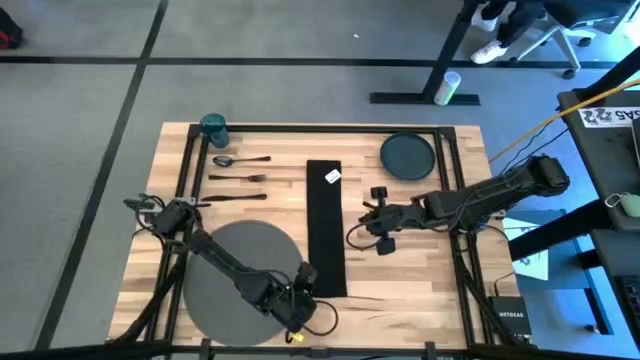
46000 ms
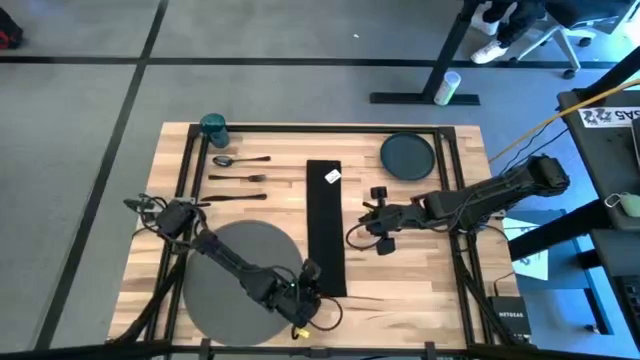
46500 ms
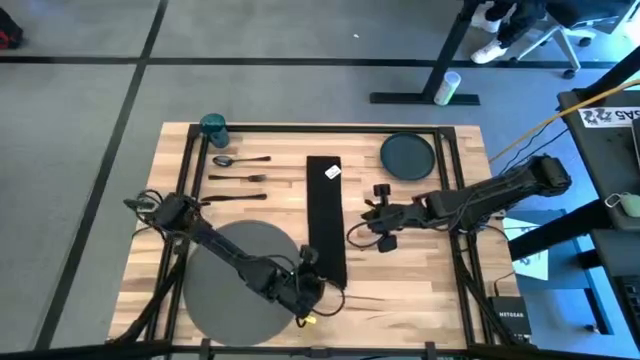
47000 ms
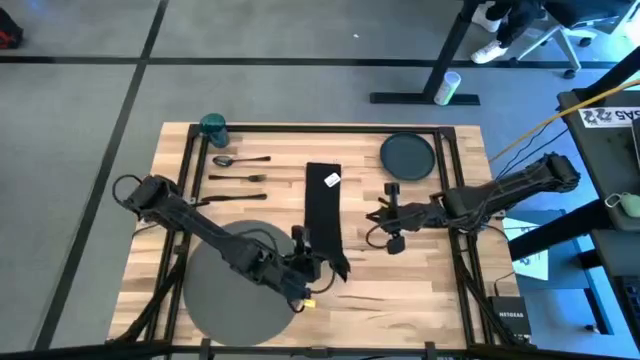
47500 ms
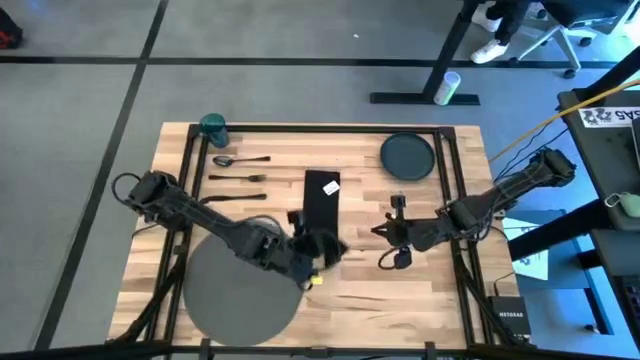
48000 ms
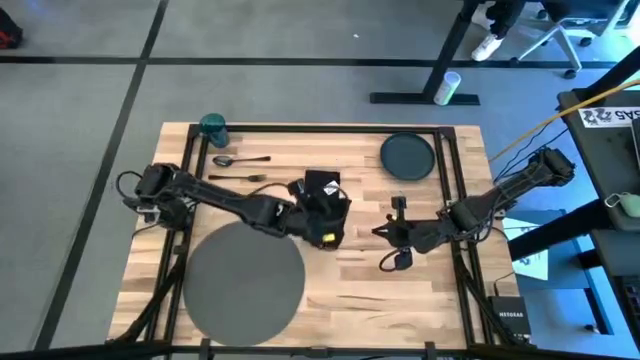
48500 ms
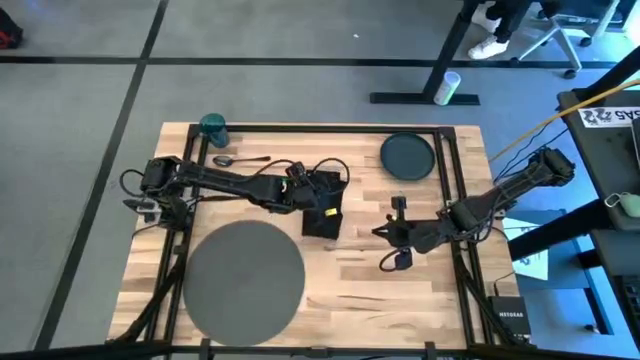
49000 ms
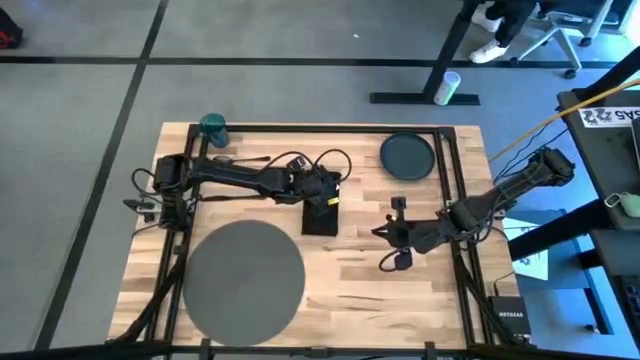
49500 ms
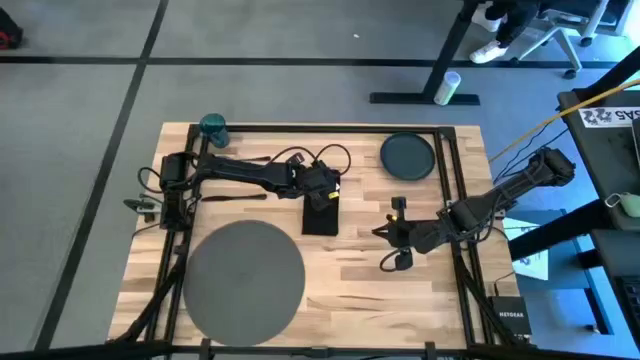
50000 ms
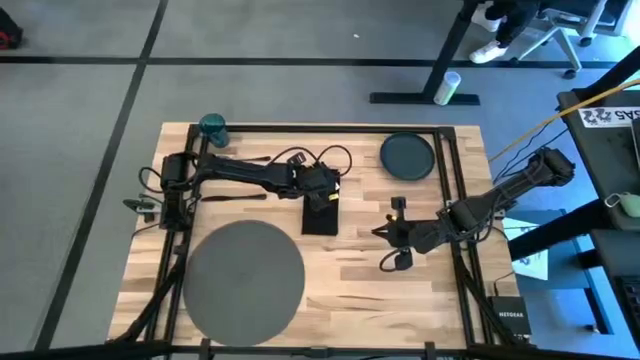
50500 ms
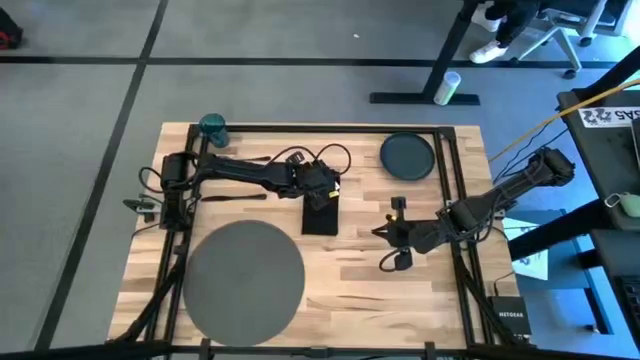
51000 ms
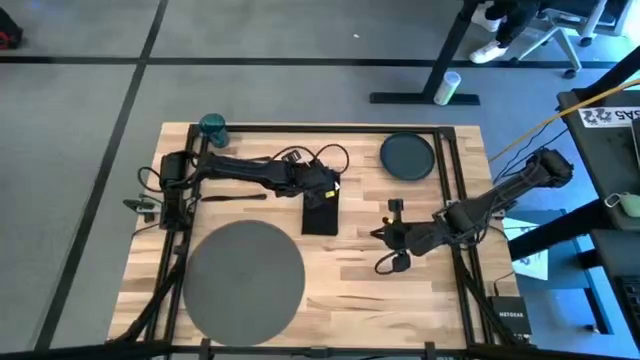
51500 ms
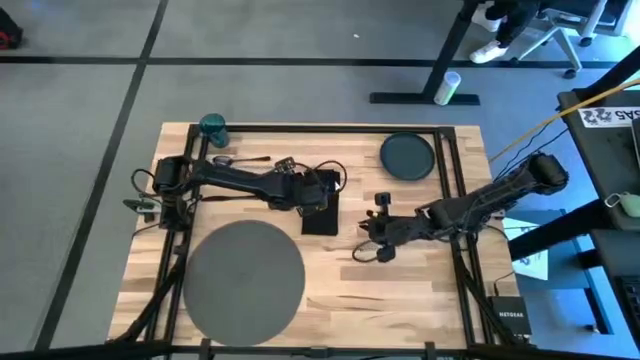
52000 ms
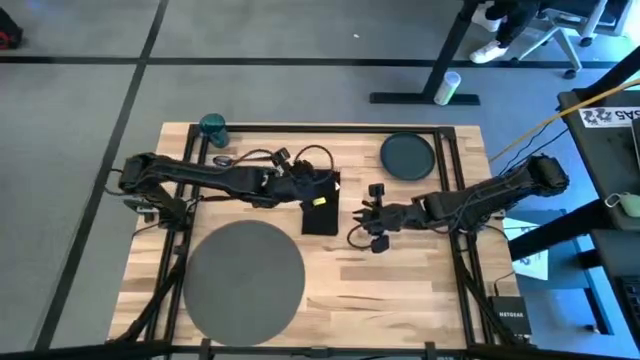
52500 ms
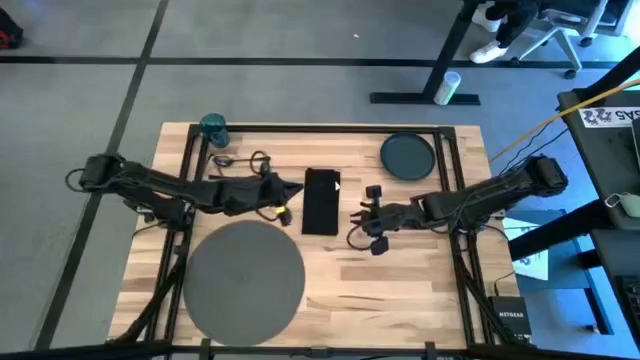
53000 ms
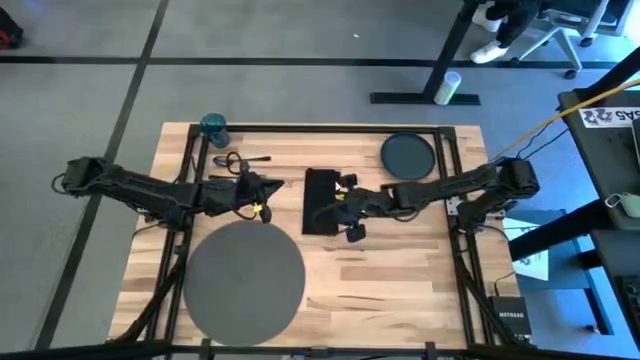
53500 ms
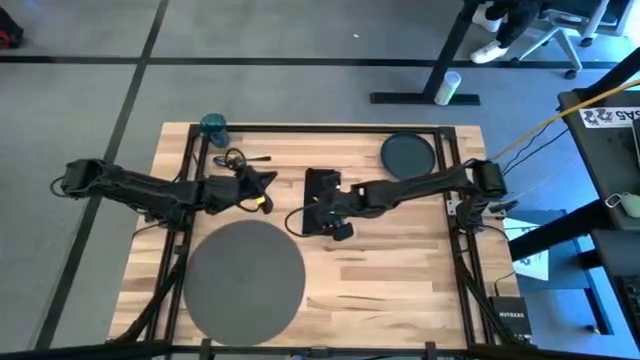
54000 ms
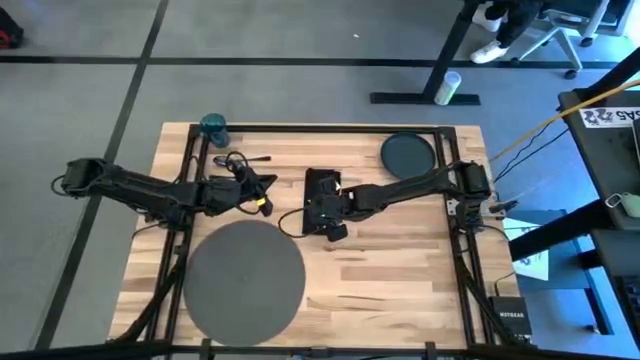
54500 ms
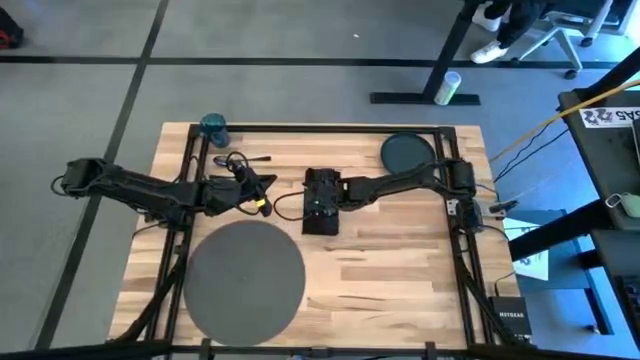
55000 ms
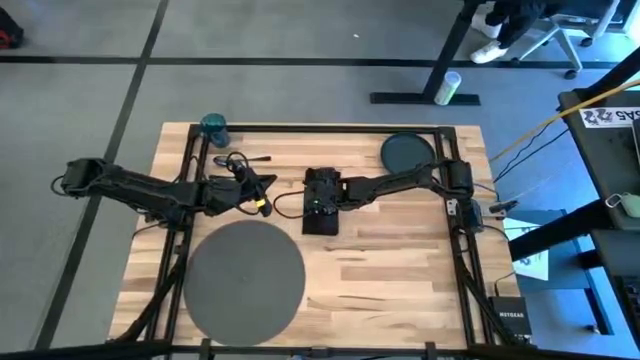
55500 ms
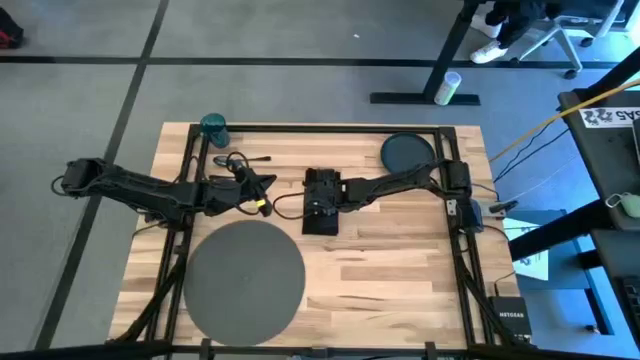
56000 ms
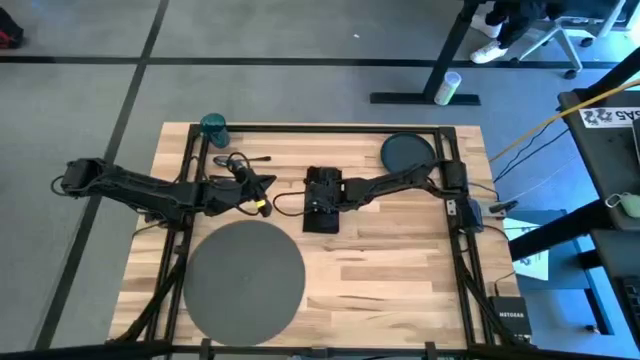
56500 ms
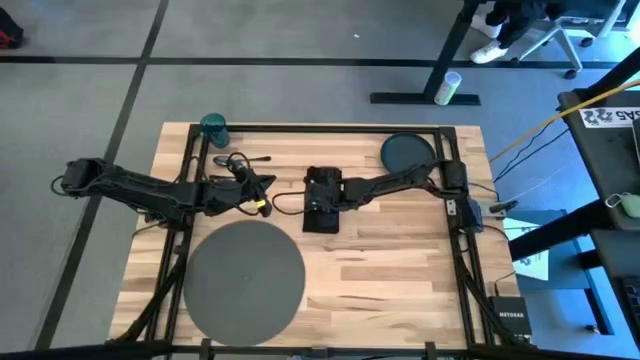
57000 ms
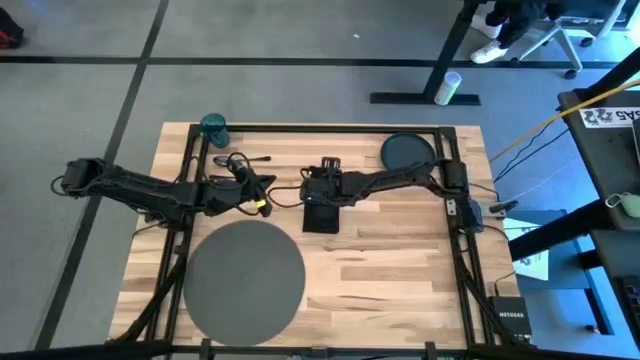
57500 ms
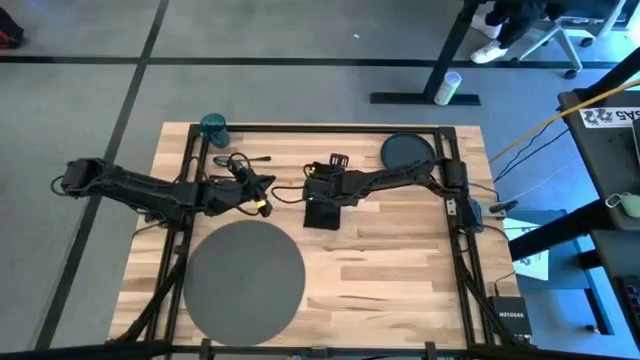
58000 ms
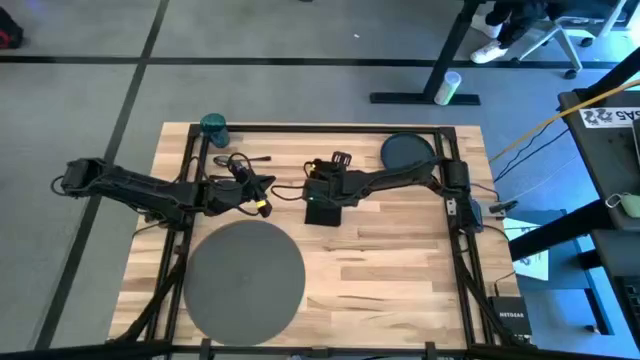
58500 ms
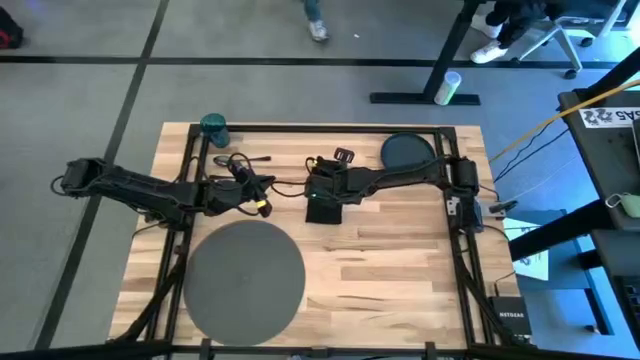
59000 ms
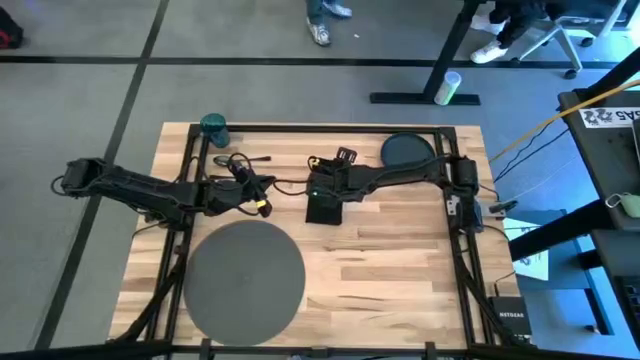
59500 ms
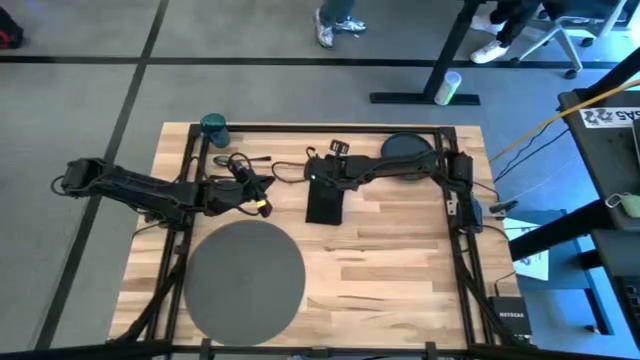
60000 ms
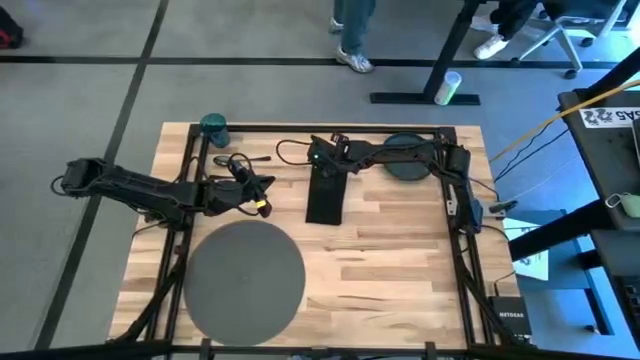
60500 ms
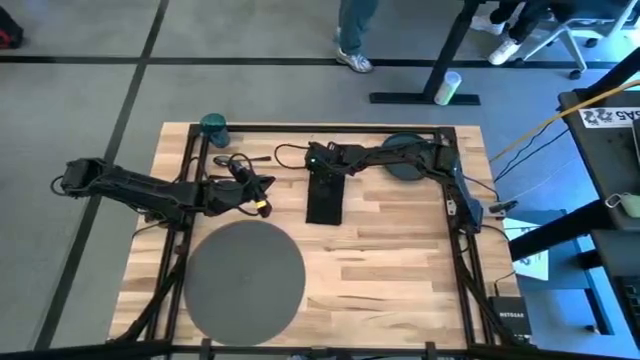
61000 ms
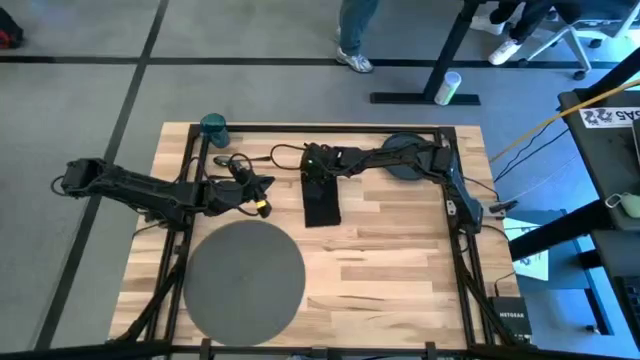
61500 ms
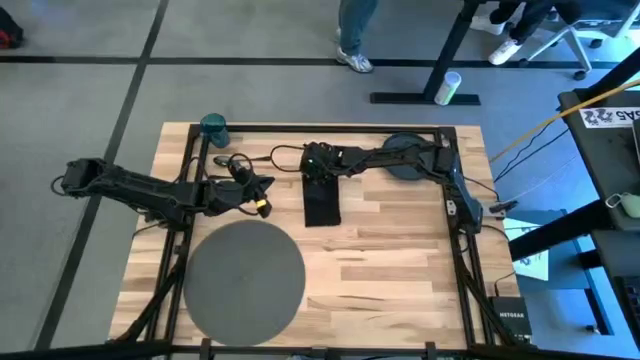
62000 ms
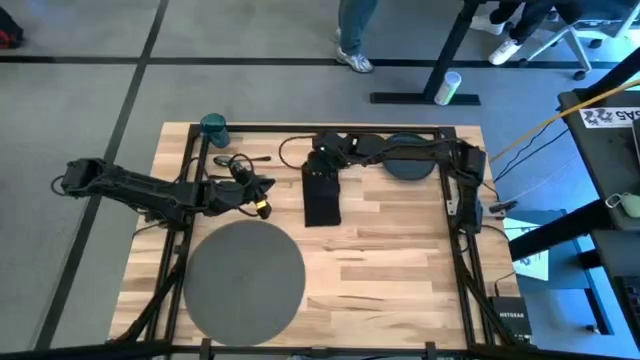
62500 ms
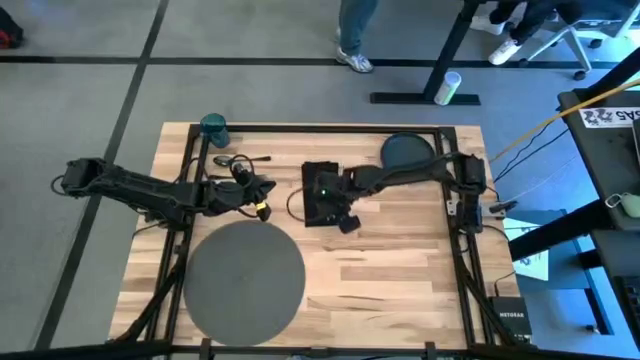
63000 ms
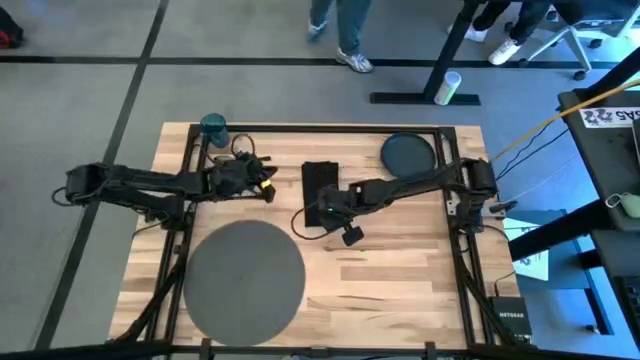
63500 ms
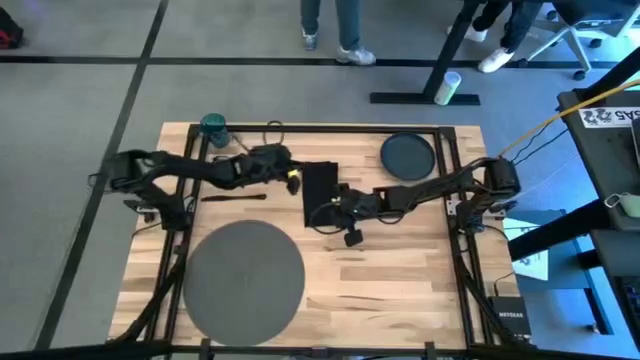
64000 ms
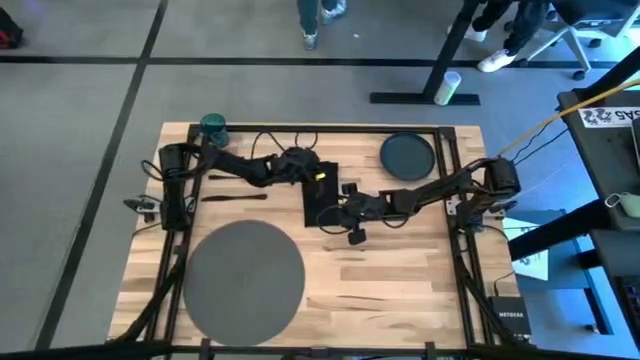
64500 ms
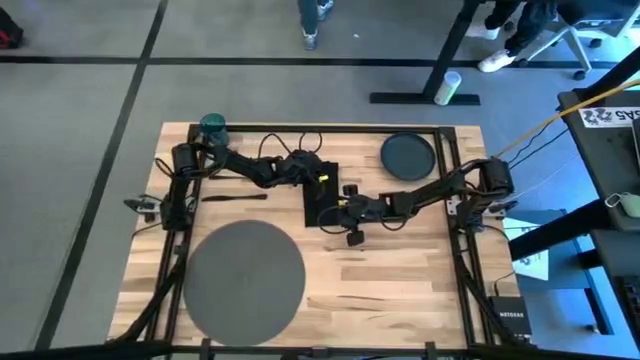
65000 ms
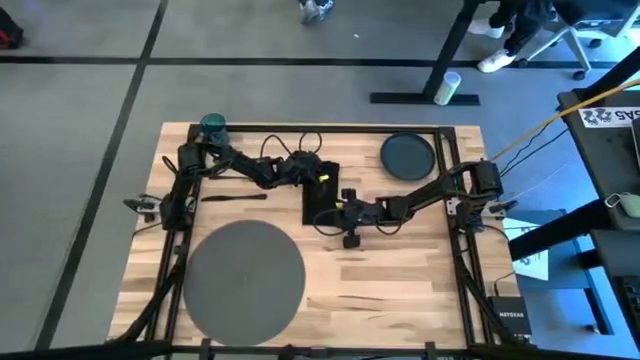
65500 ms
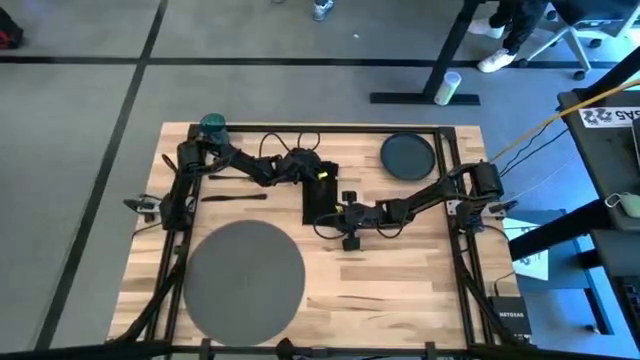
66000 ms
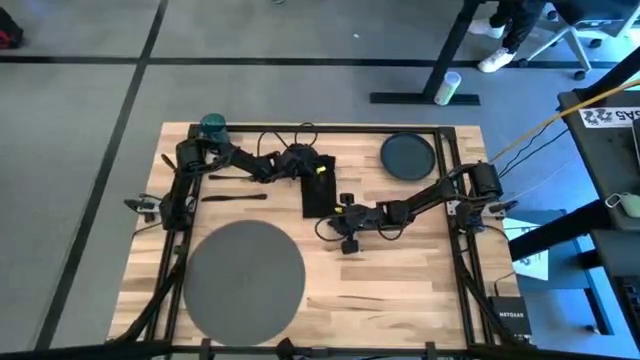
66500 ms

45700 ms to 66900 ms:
Task: Set table place
Fold the black table napkin

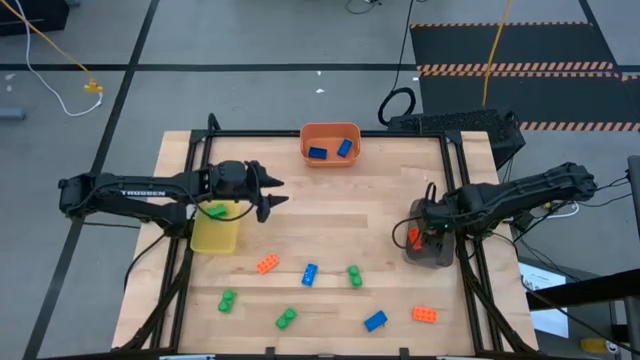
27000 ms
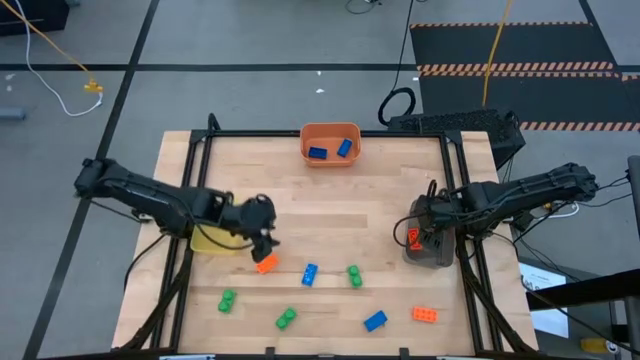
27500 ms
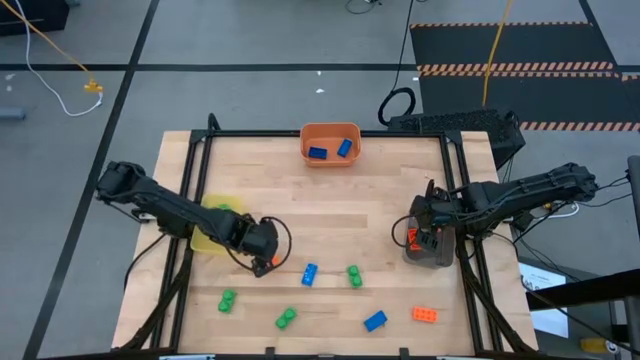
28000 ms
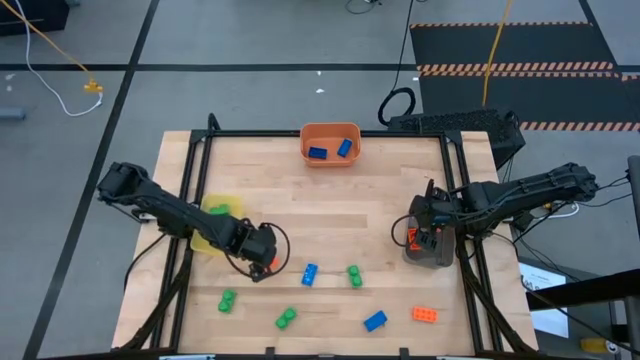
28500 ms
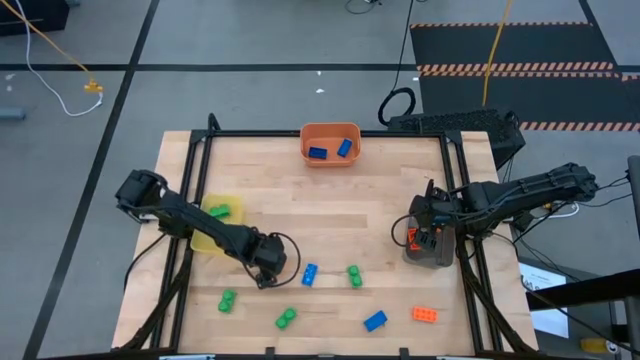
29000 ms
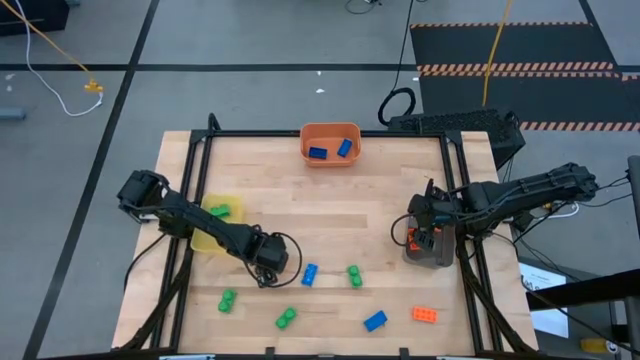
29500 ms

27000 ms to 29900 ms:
Task: Sort & place blocks by color
Put the orange game piece into the black bin
